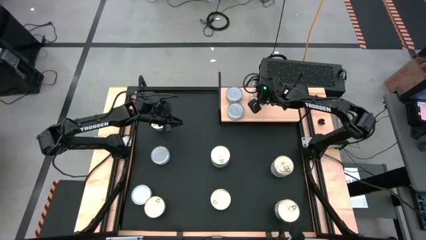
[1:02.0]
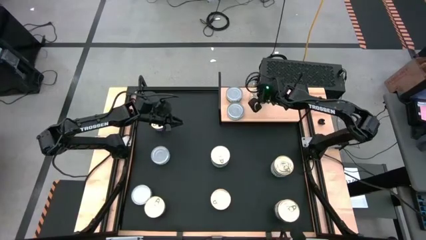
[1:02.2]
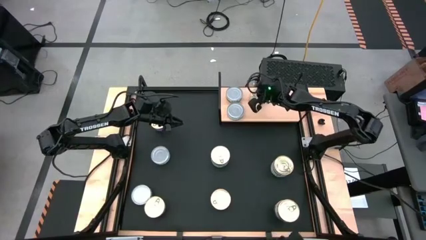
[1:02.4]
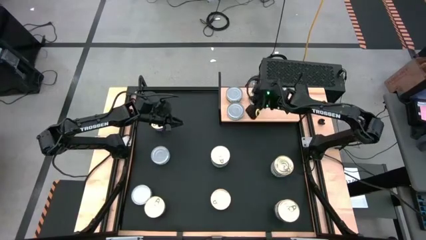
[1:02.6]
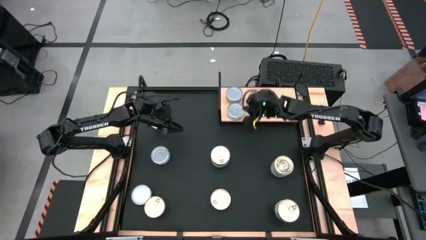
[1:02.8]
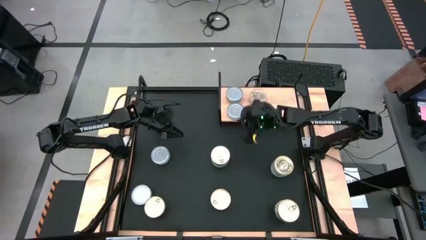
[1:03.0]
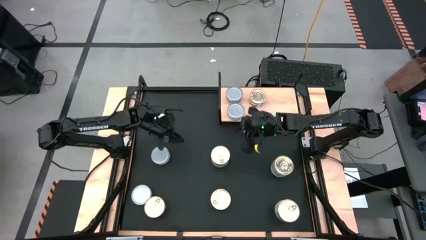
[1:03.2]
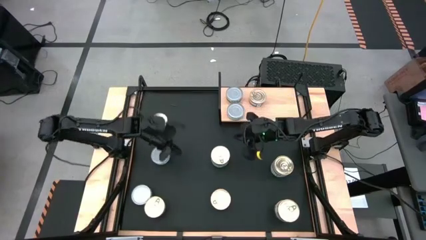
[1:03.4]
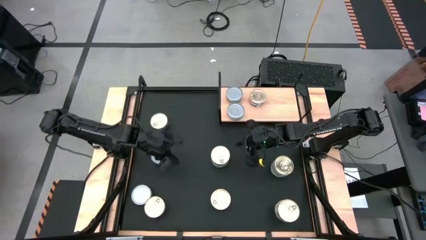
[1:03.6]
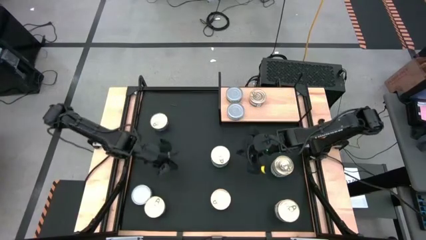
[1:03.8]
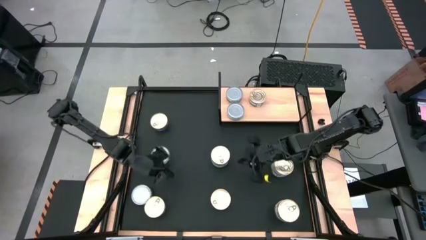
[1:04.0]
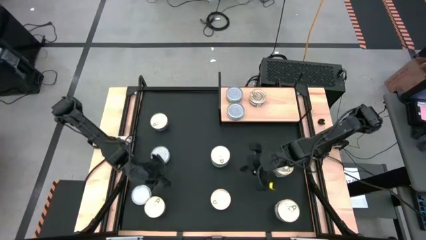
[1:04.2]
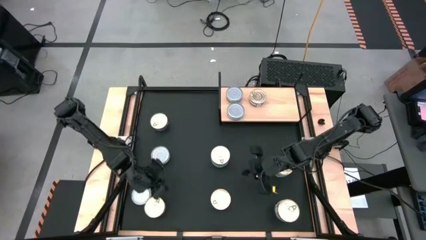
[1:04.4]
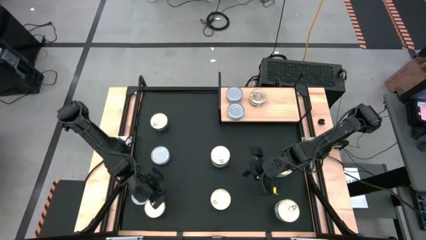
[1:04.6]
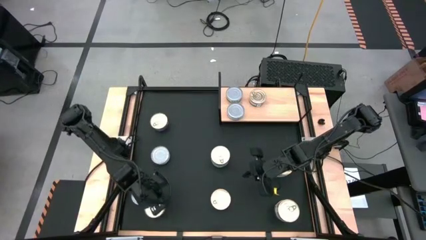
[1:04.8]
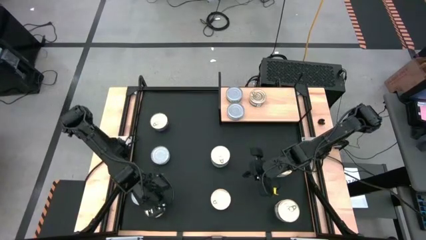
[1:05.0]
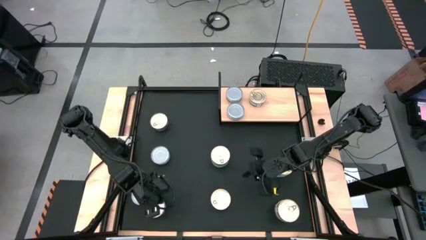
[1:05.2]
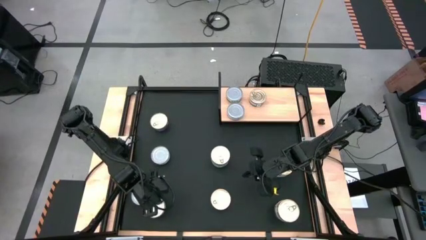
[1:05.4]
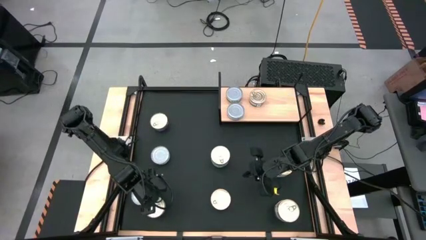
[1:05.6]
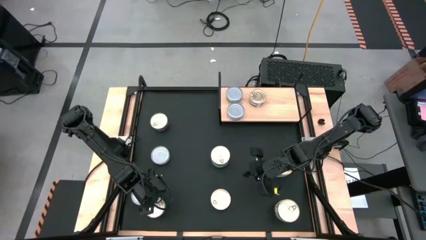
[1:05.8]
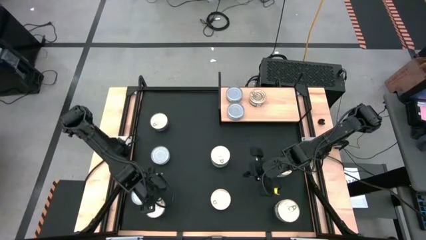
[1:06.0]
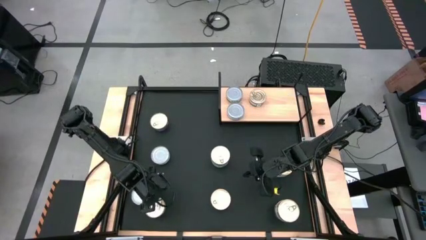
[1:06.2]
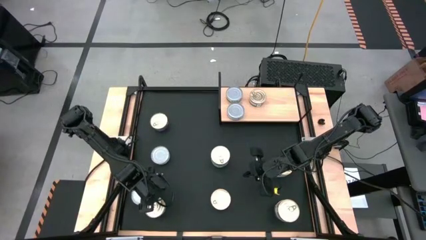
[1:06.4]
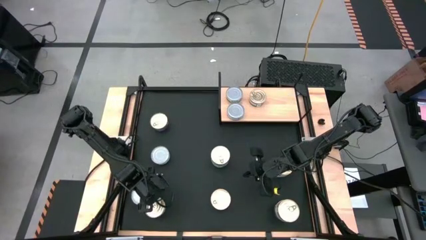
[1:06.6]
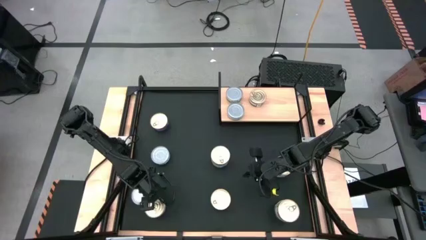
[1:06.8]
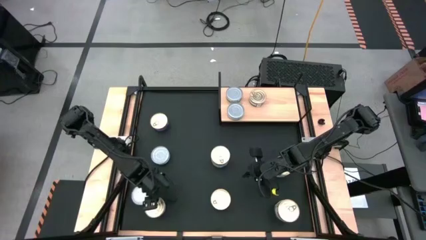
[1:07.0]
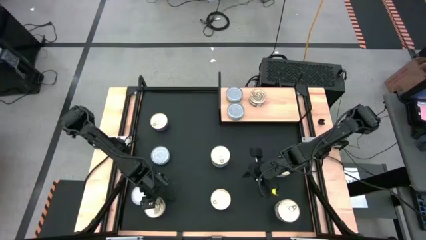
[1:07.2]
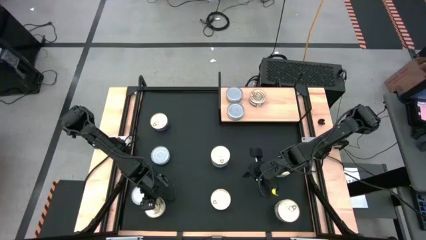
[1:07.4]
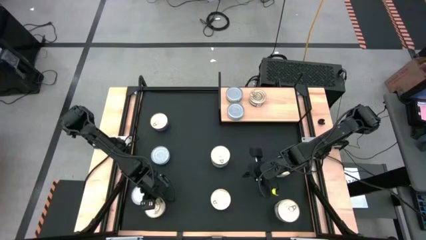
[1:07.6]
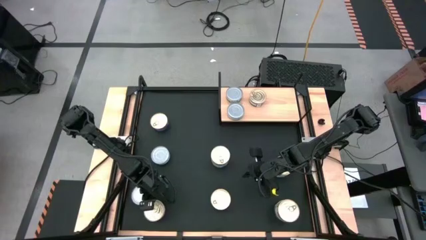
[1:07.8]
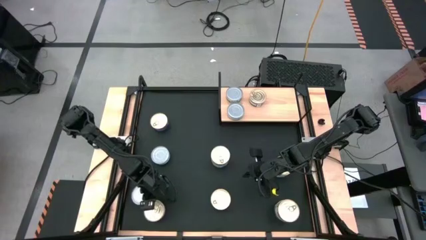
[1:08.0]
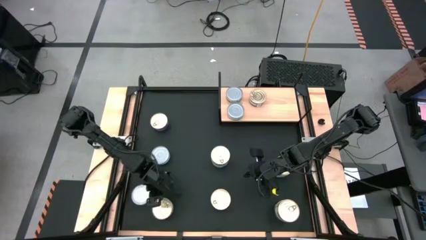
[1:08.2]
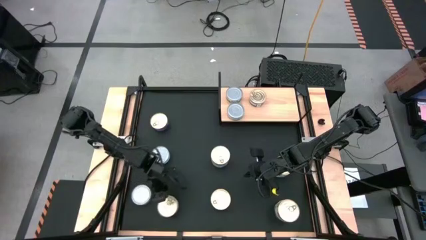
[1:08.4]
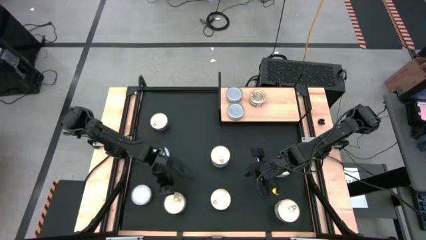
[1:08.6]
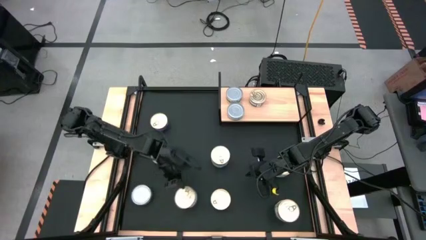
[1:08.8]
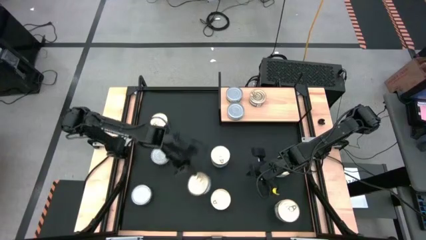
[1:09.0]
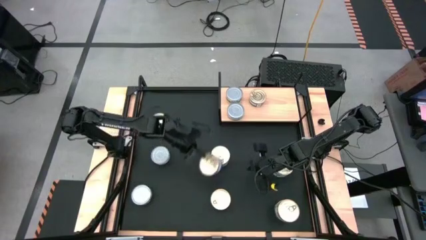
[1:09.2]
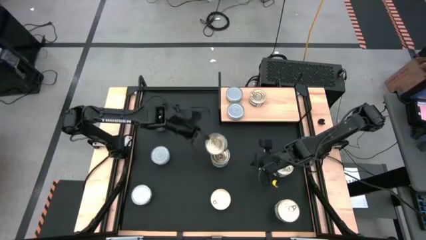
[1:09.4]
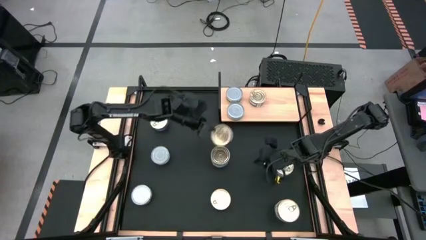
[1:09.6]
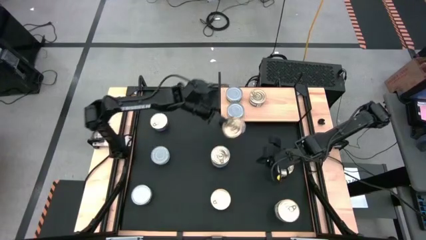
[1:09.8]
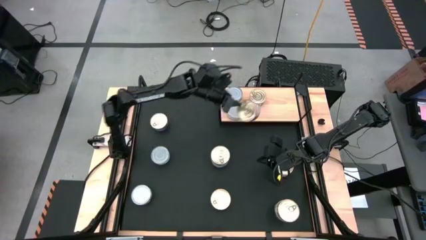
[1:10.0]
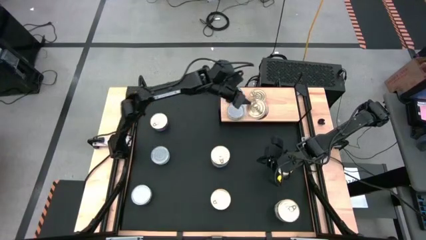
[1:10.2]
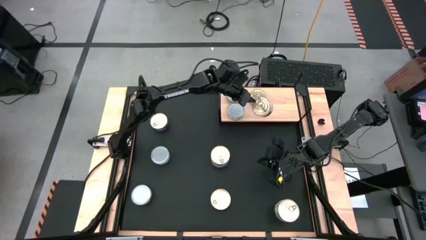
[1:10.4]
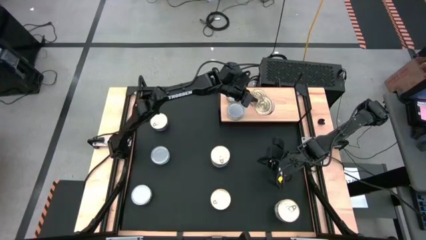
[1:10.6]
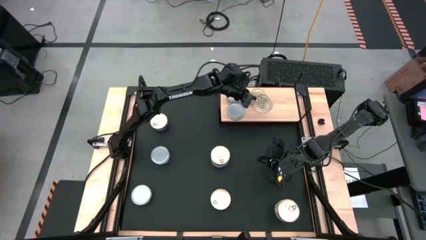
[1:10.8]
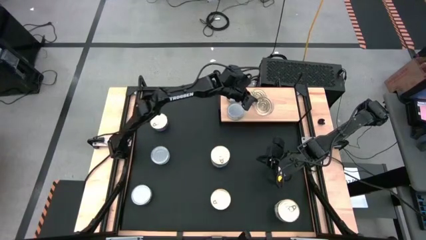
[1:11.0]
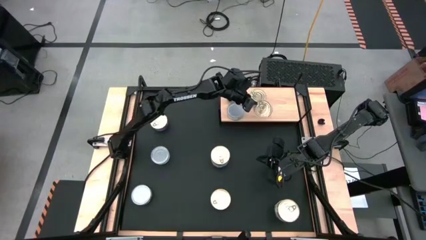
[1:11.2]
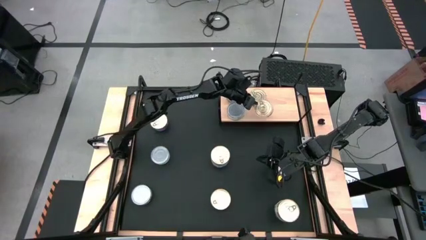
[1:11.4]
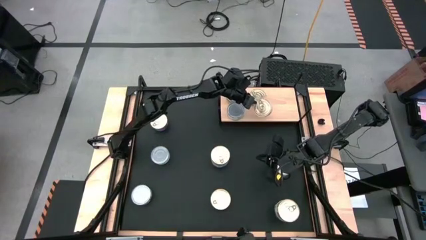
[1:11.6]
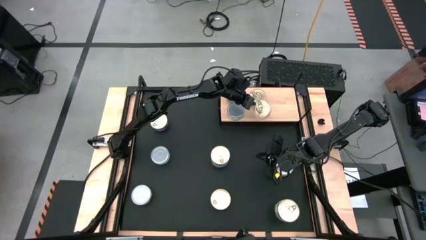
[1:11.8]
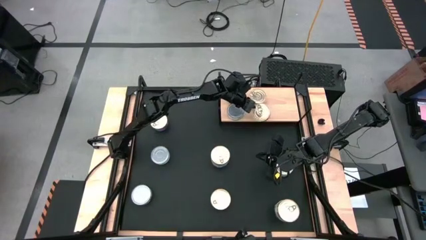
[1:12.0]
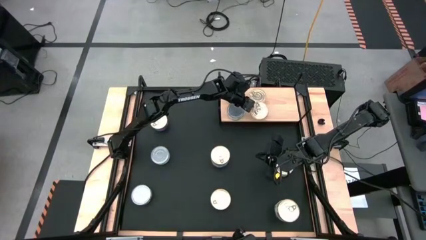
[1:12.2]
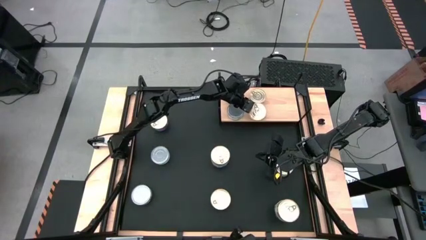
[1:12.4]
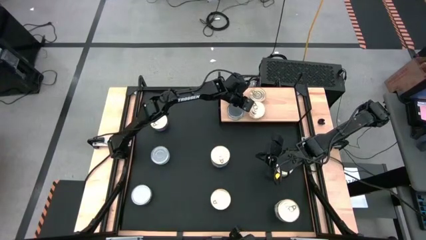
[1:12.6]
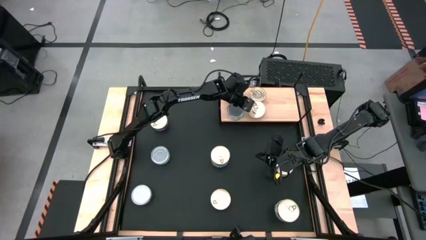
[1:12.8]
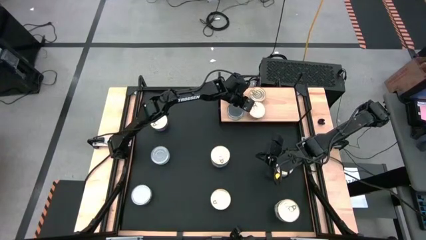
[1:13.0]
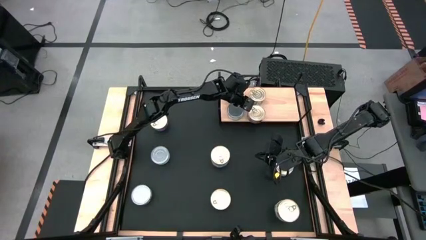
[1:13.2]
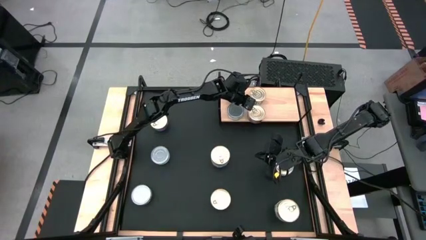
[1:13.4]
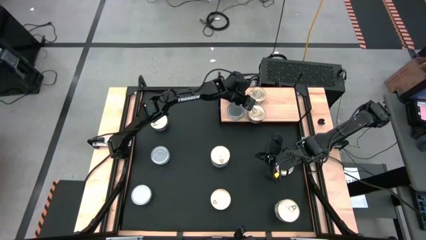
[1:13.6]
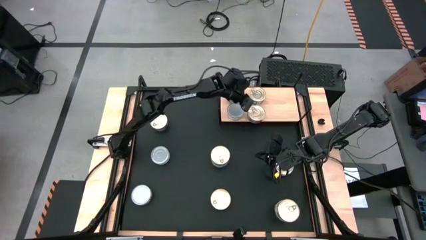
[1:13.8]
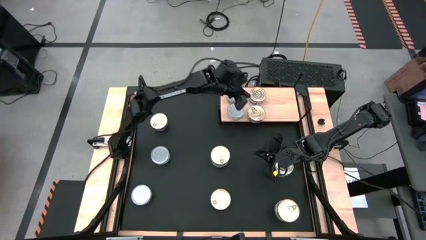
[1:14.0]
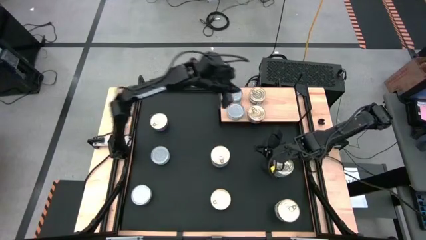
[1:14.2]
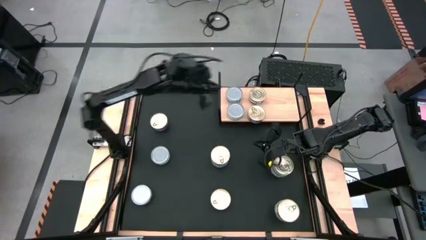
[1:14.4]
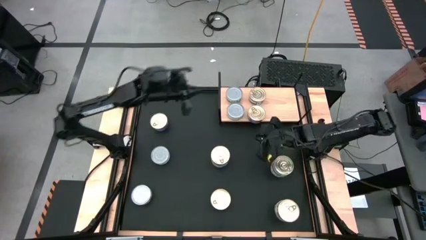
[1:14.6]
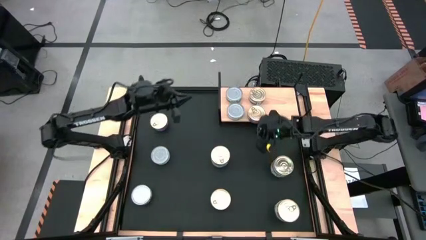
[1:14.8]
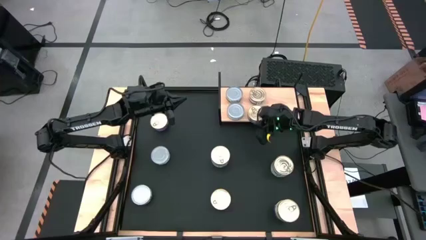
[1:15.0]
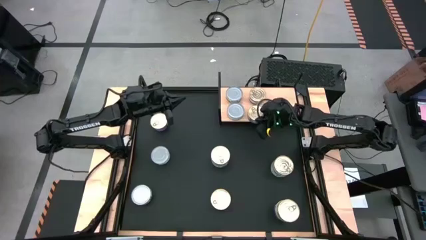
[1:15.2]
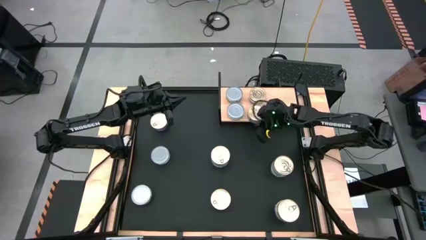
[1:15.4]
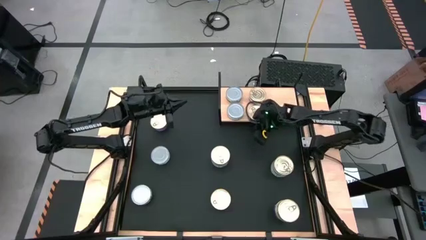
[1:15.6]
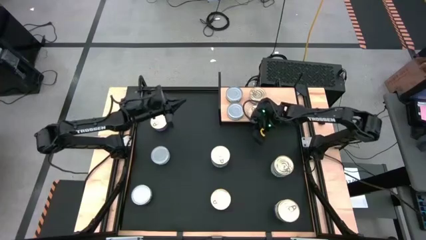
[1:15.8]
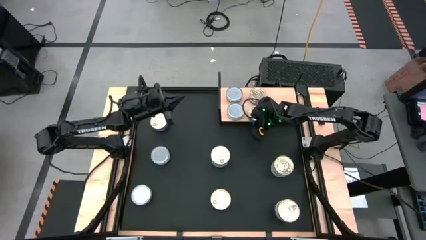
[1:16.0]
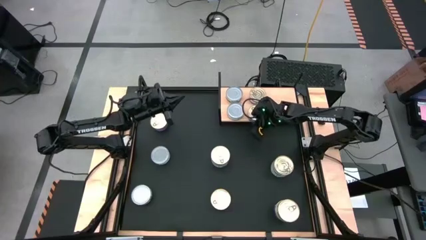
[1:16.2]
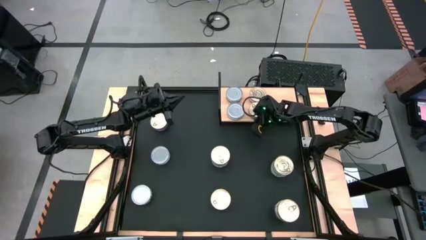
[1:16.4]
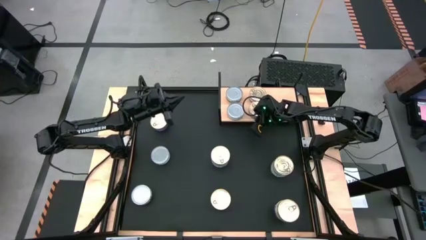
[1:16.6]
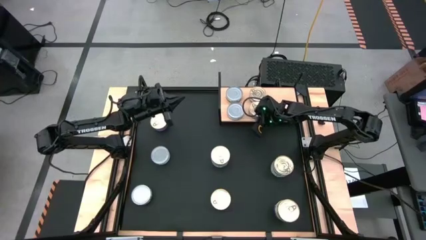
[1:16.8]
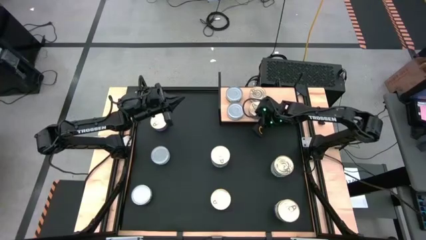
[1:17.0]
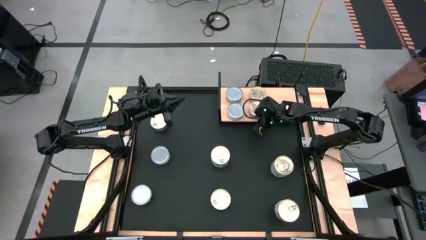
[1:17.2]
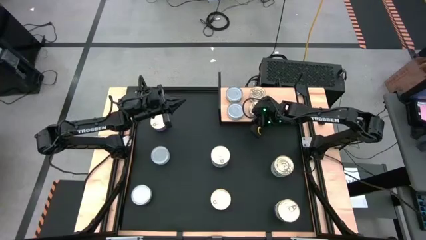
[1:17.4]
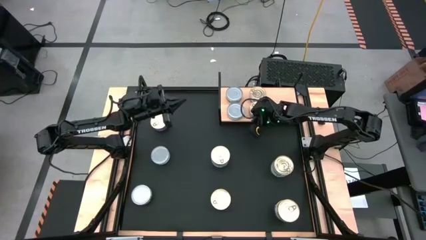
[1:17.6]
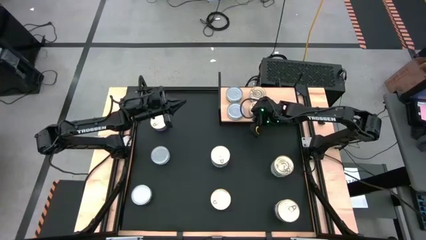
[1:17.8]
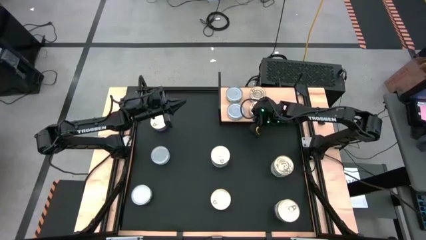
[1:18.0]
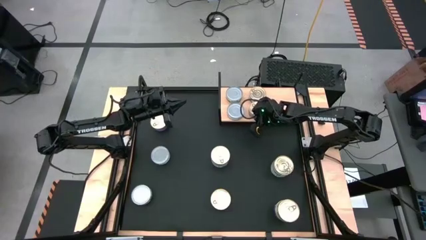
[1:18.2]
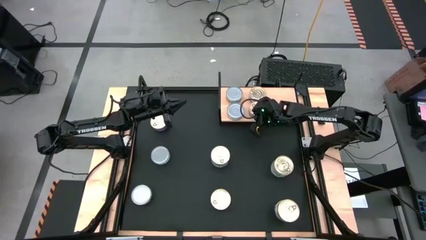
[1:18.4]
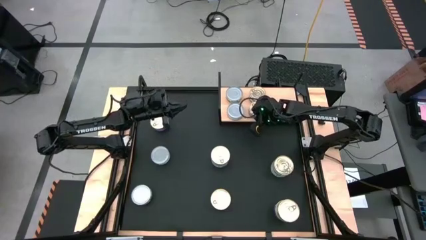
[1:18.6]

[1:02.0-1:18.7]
Task: Stack canned seafood by type on shelf
Put the blue pink tuna can on the shelf
